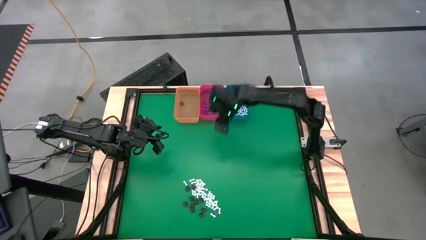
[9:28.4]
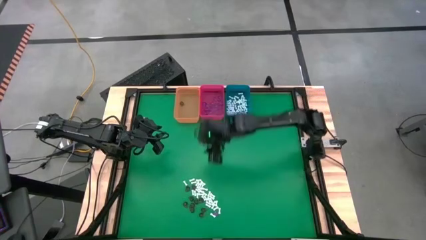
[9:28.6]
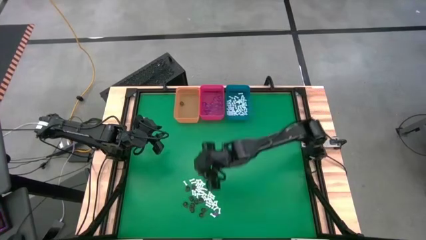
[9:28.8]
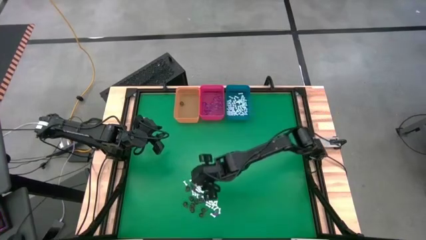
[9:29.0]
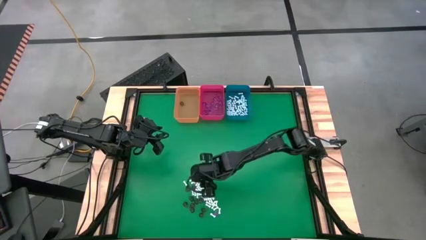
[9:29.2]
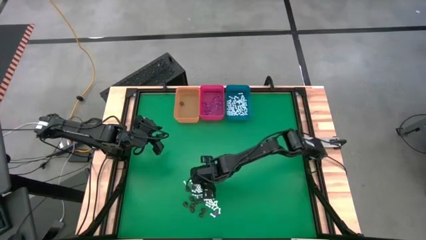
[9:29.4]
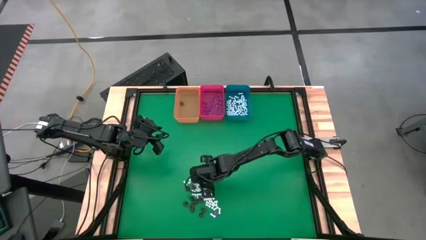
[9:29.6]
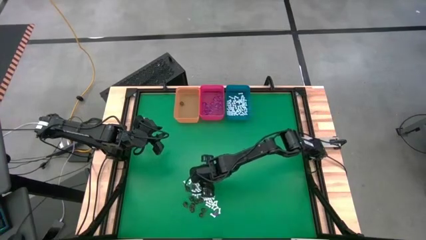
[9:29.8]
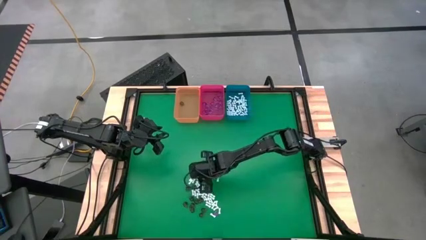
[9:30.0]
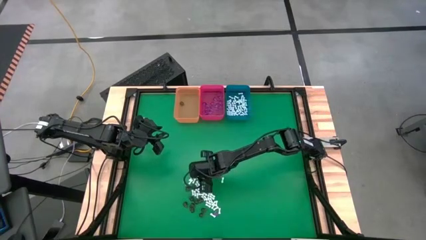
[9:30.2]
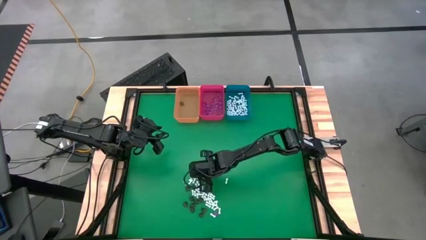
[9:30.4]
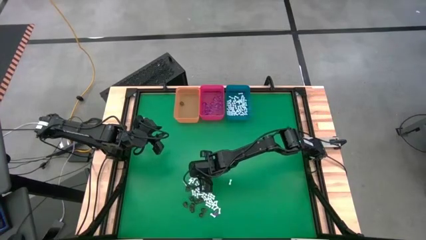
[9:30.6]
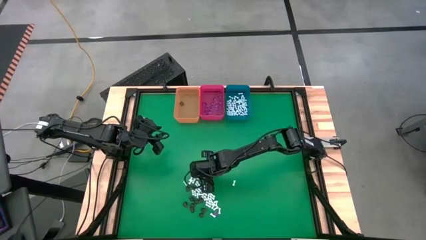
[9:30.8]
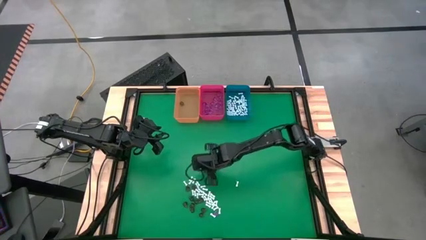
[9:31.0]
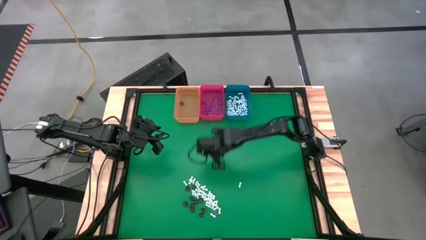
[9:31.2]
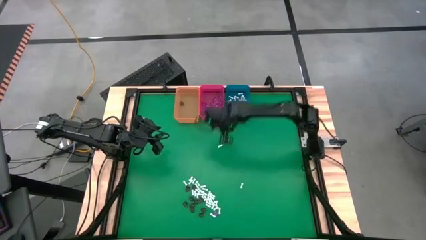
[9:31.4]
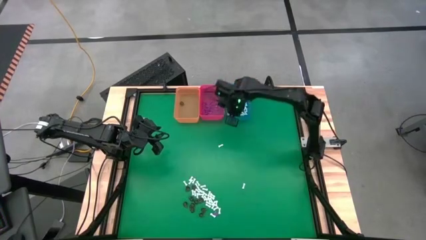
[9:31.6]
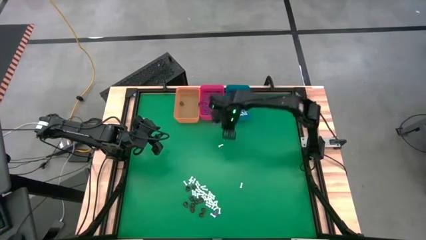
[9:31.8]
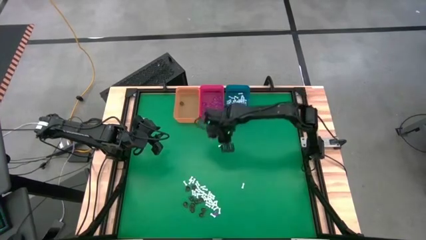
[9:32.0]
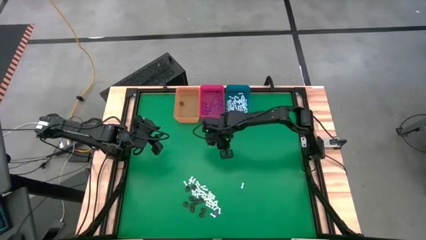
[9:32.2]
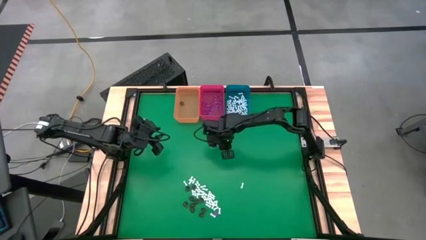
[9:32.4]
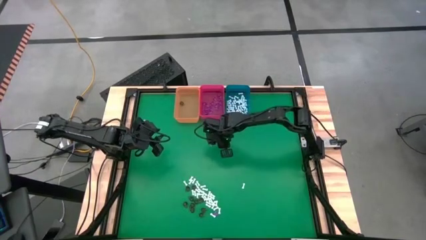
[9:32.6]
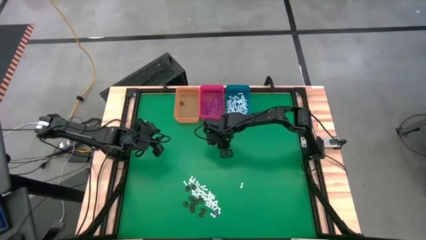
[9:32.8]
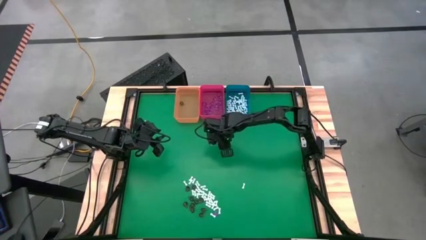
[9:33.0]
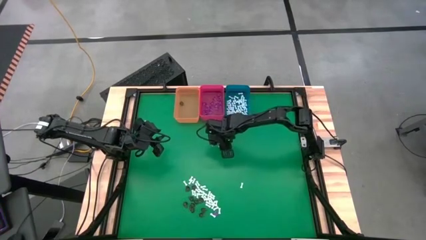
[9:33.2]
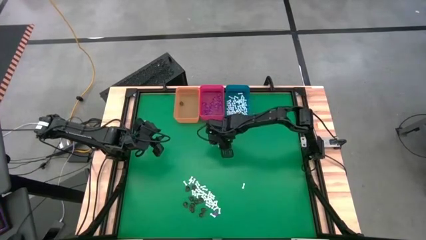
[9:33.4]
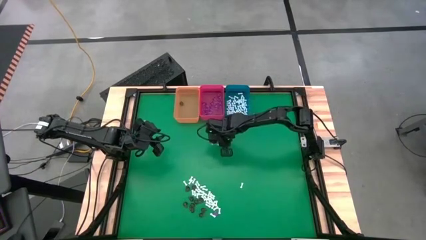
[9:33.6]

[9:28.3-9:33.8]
Task: Sort Halloween decoration
Put the white bone toy into the blue bin

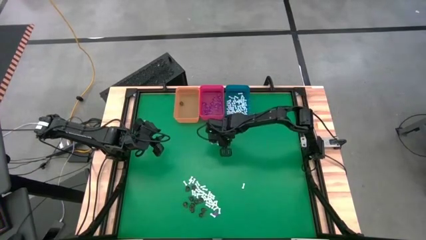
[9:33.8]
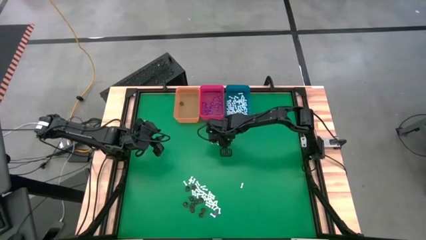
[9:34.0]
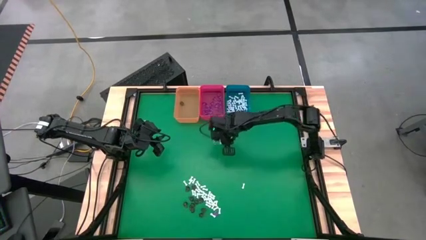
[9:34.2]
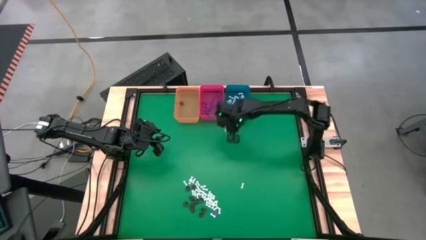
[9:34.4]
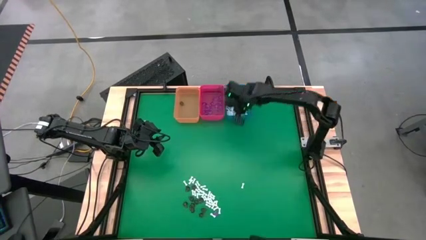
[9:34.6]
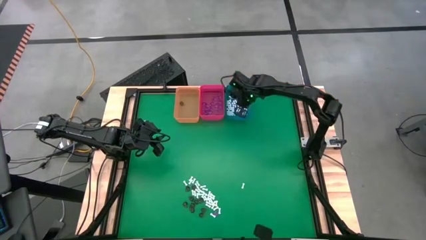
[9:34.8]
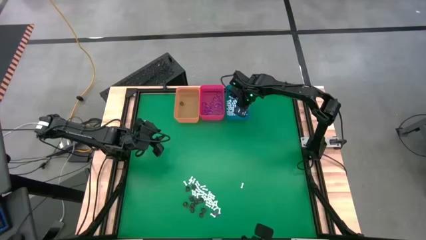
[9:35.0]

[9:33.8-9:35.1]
Put the white bone toy into the blue bin

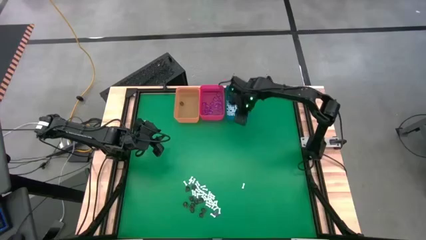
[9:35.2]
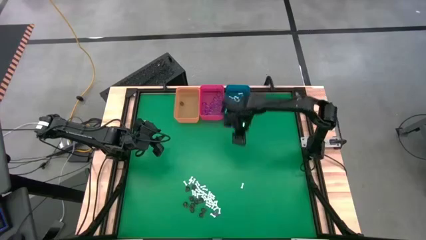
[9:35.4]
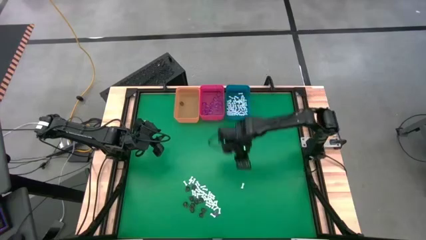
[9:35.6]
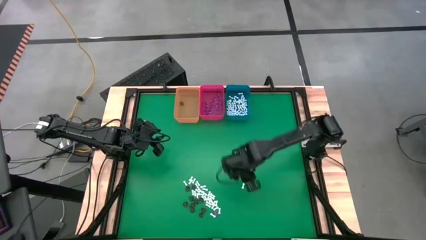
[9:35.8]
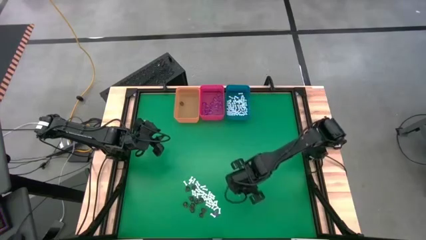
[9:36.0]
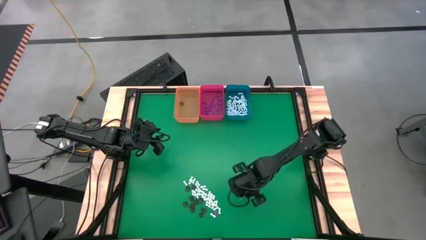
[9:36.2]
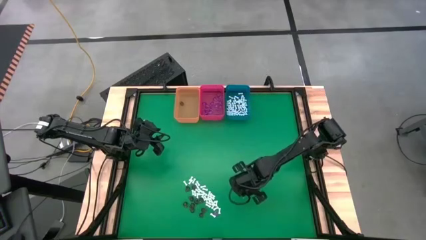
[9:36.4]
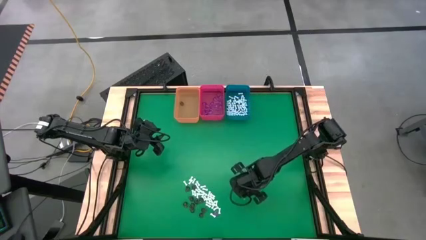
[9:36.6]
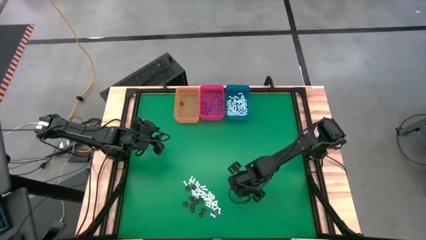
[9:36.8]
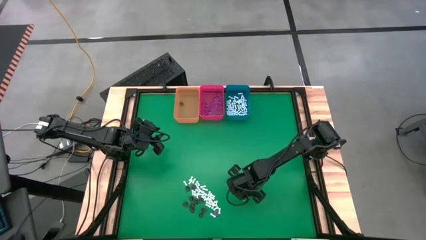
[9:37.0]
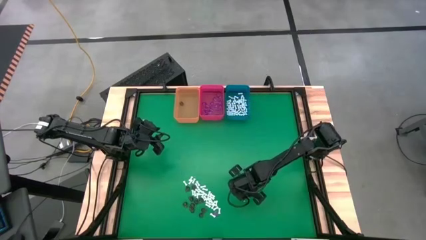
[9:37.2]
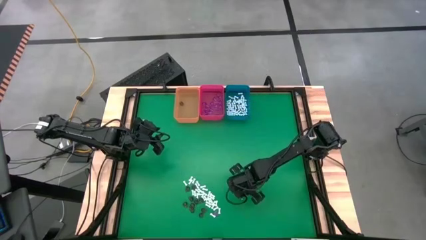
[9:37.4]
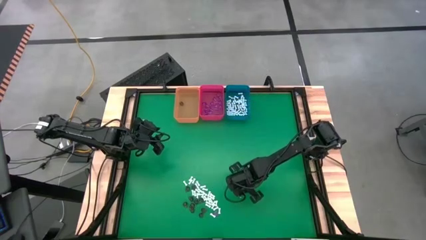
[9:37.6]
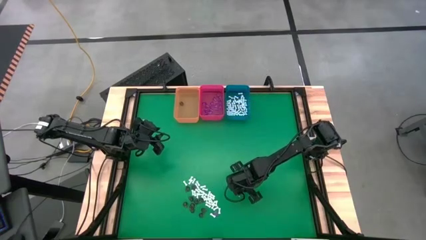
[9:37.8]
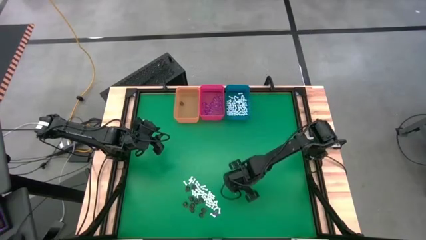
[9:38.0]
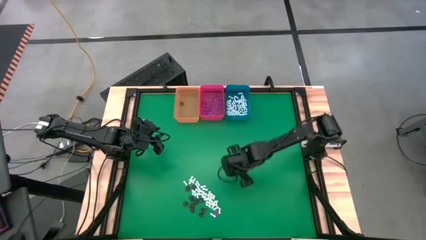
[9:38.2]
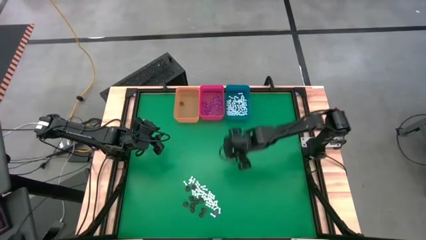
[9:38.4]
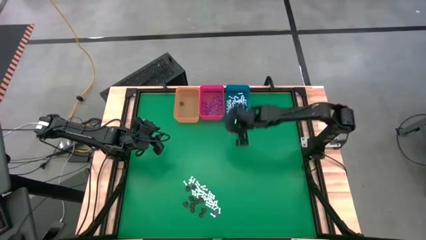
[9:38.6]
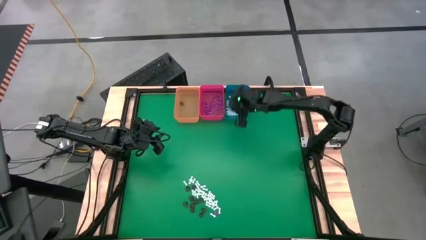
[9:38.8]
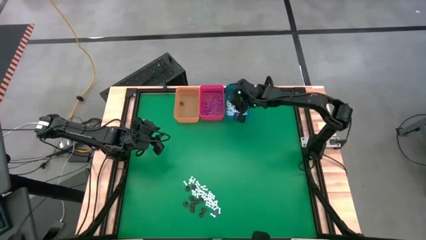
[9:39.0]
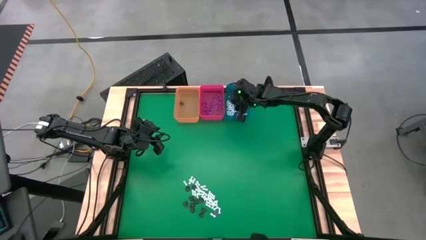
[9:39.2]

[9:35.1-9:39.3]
Put the white bone toy into the blue bin

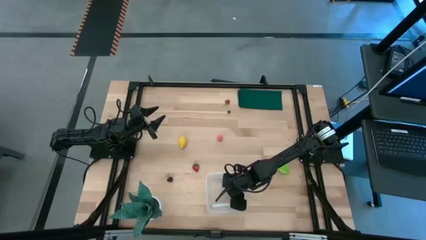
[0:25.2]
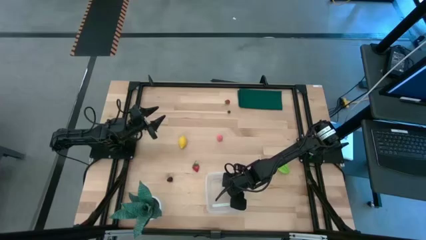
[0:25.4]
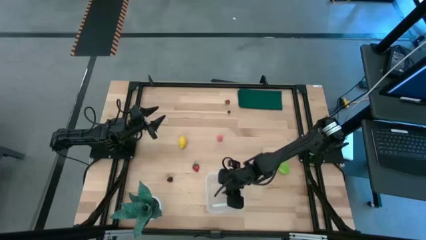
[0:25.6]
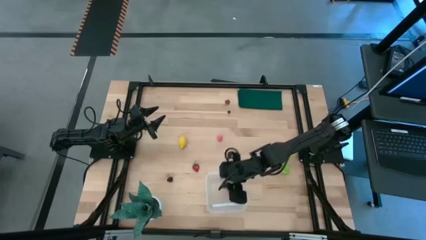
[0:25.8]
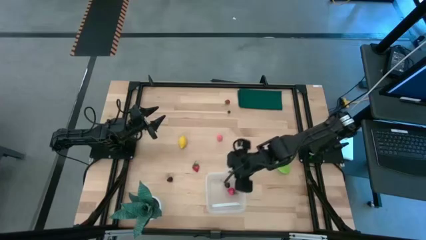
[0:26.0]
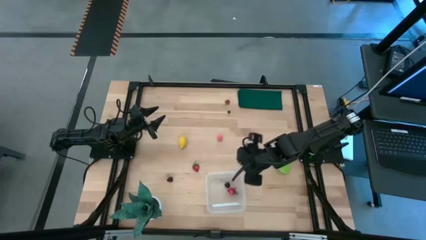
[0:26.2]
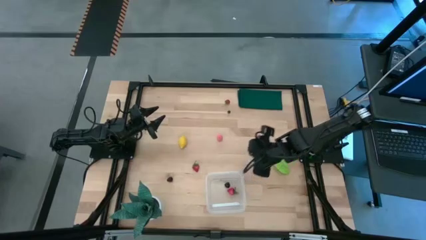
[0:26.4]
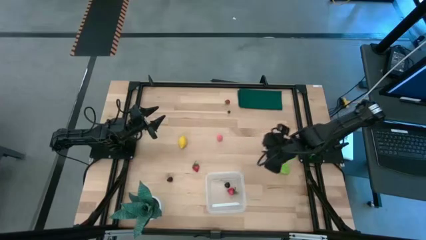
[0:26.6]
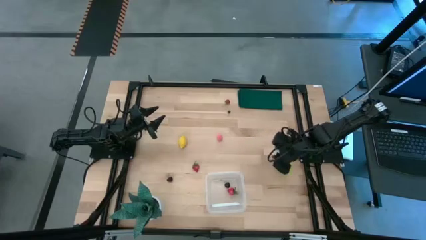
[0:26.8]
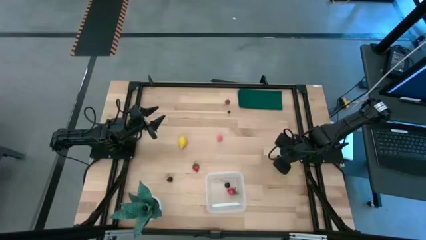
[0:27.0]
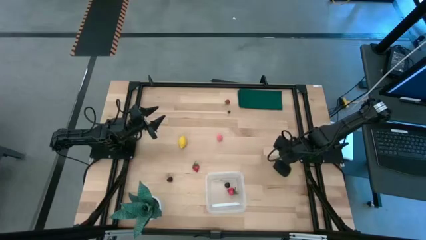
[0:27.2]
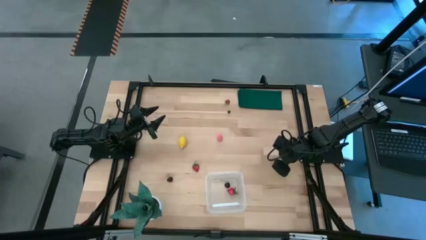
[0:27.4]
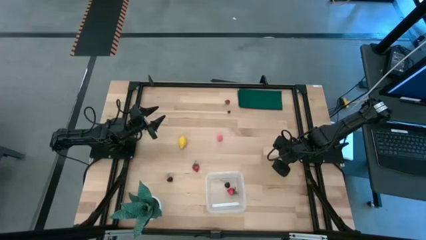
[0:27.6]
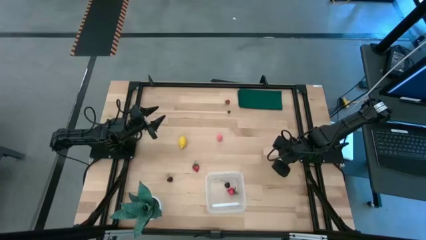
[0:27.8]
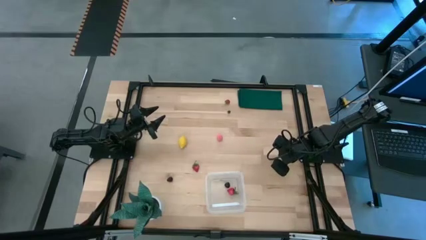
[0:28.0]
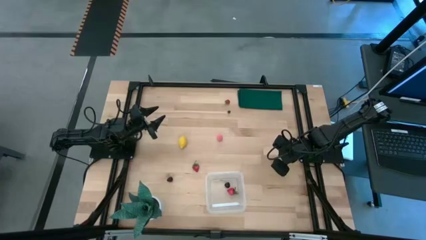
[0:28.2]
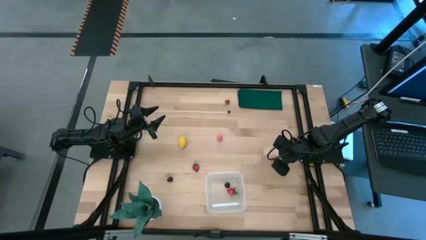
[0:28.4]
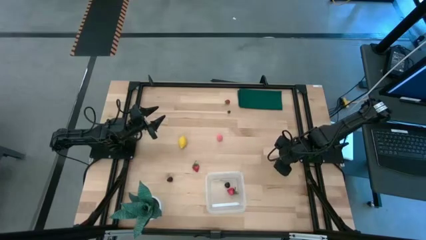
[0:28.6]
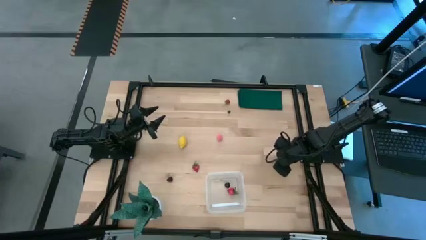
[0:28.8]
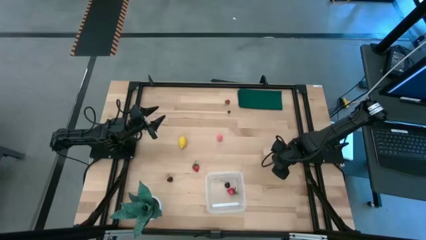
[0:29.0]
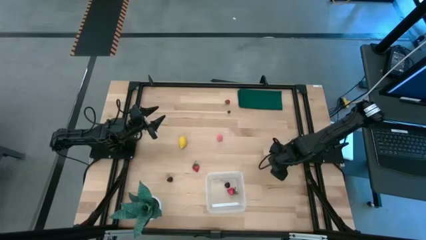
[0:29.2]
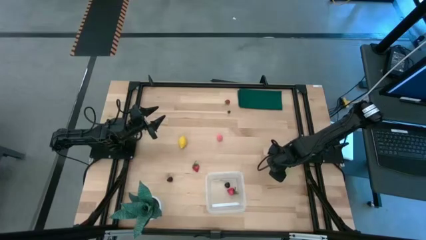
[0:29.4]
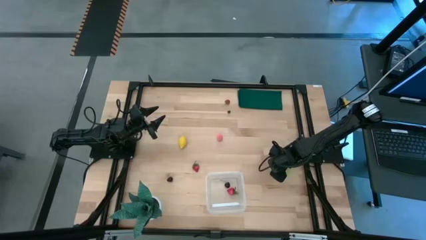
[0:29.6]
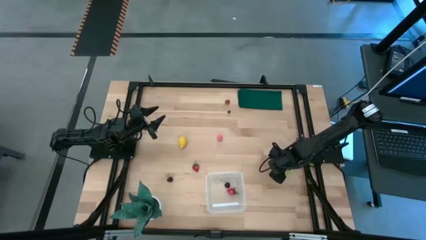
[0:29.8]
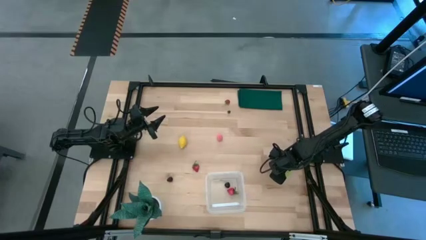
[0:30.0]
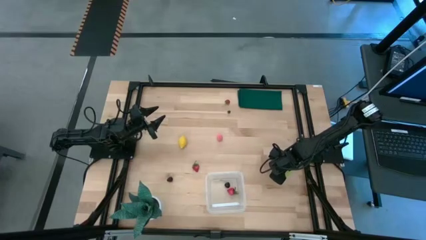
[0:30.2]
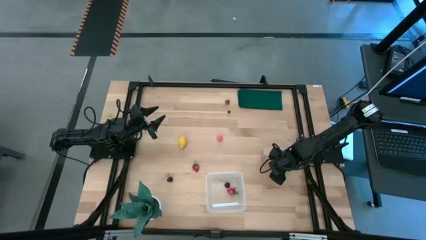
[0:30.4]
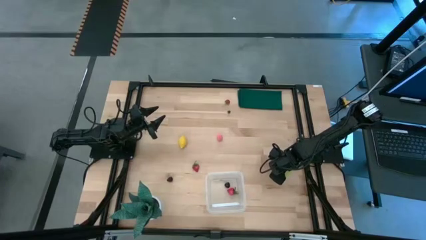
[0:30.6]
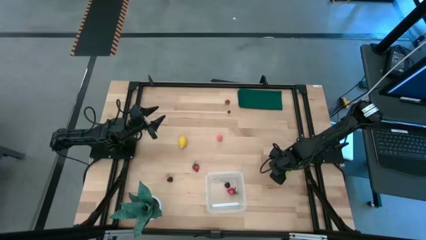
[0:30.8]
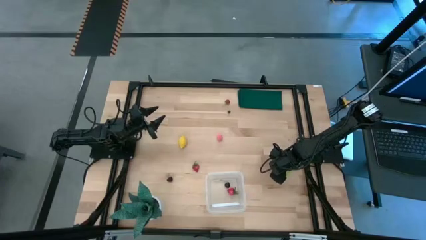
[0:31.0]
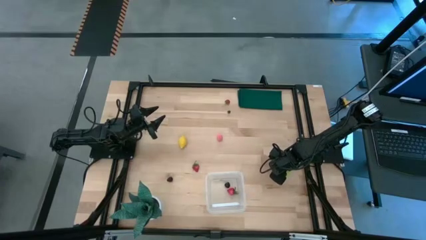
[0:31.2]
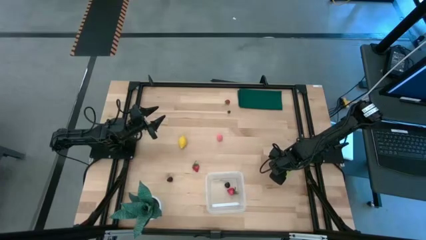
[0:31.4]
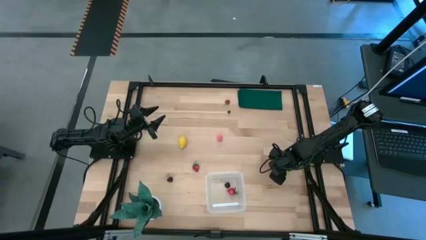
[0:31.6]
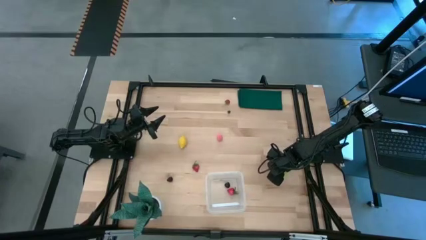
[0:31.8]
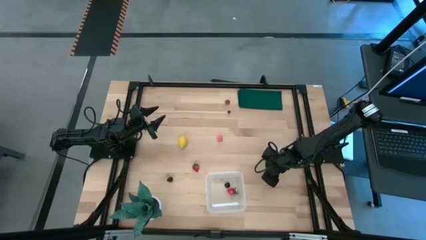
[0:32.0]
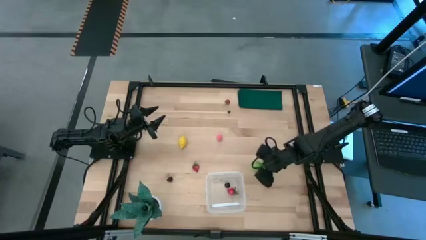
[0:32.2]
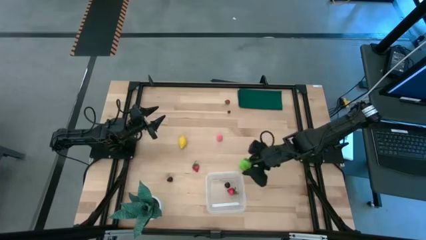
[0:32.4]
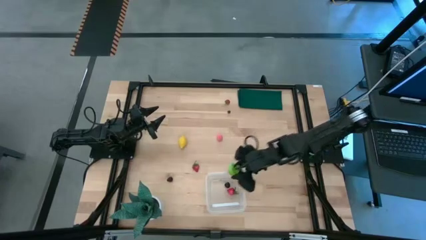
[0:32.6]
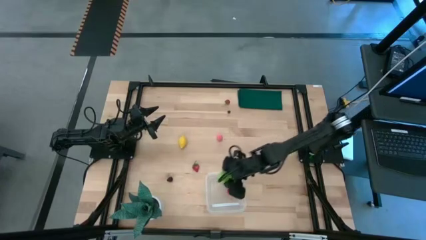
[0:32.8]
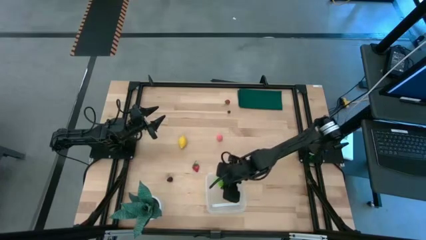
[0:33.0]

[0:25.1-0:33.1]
Task: Pick and placing Produce into tupperware
Put the green star fruit into the transparent bin
